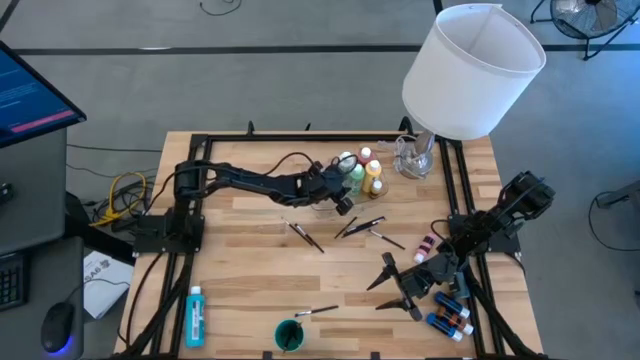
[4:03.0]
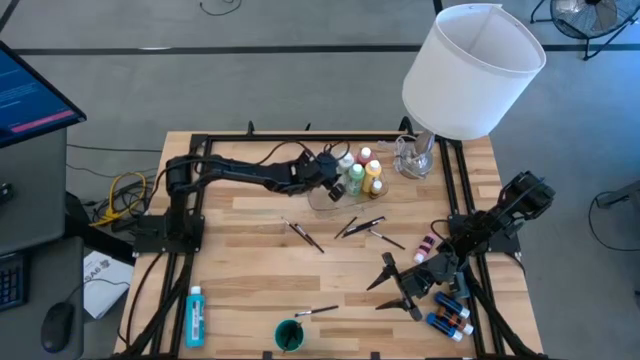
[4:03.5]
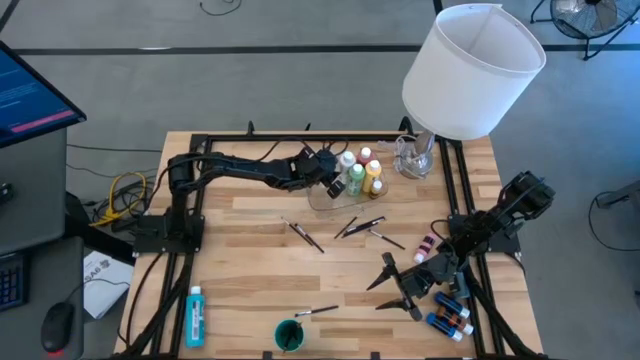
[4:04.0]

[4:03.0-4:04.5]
Task: Pick & Place Paint Supplies
Adjust the white paint bottle in the transparent bin

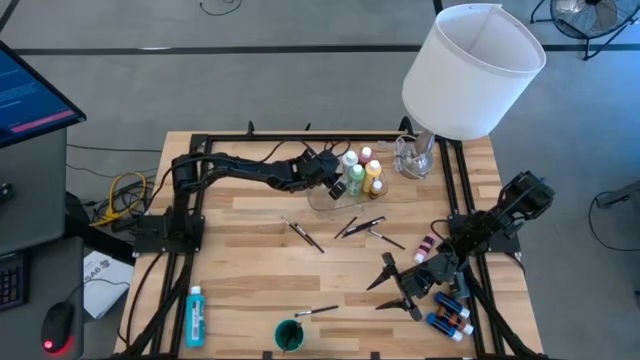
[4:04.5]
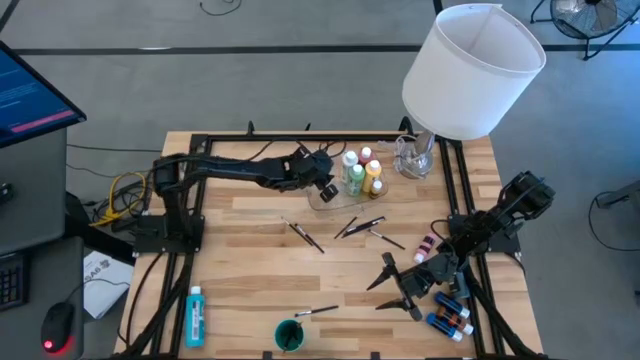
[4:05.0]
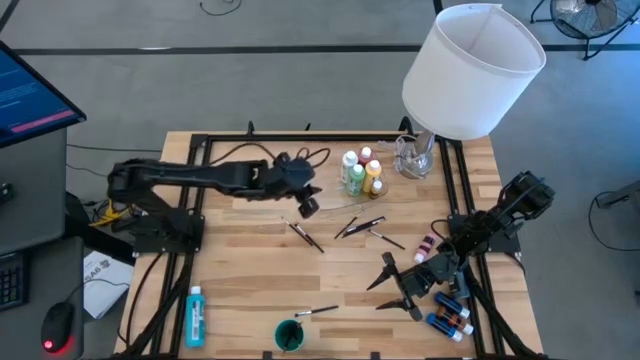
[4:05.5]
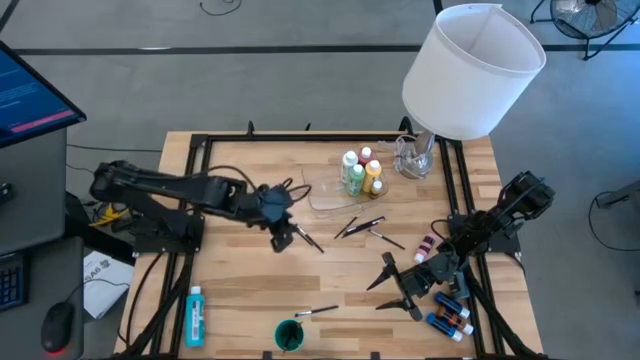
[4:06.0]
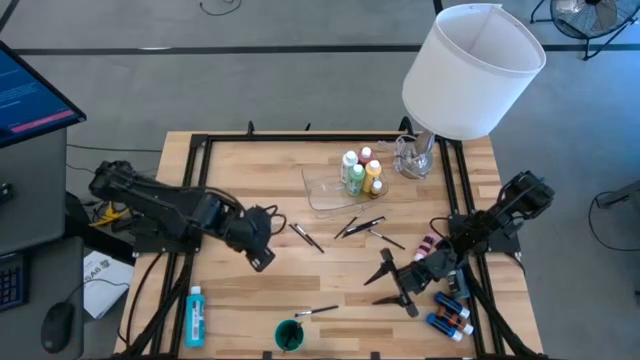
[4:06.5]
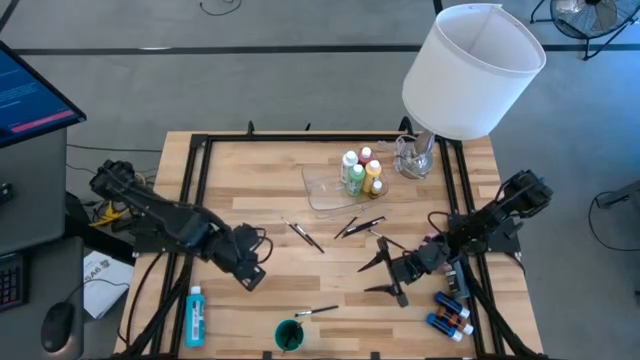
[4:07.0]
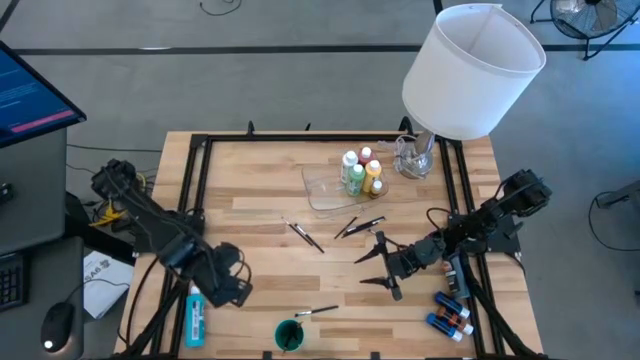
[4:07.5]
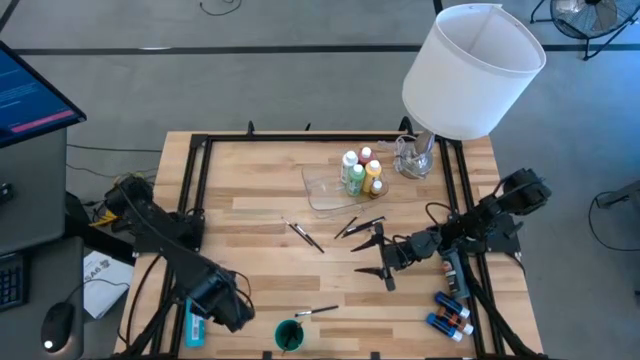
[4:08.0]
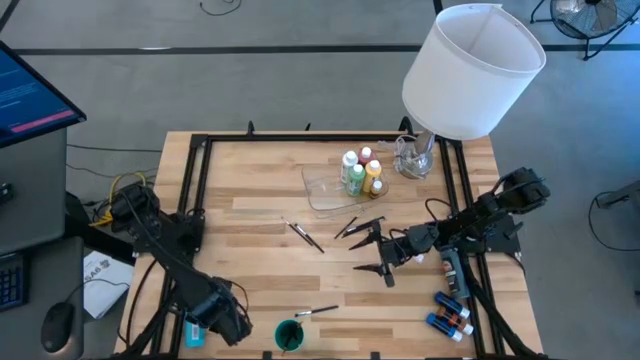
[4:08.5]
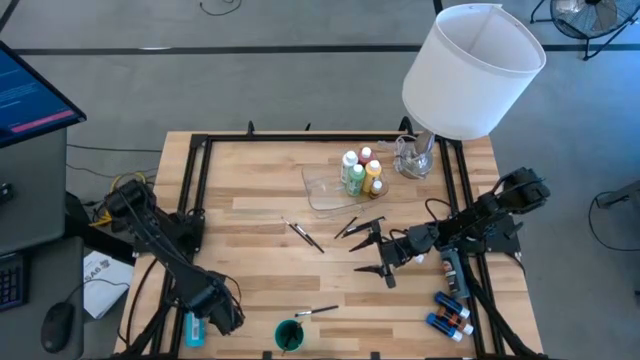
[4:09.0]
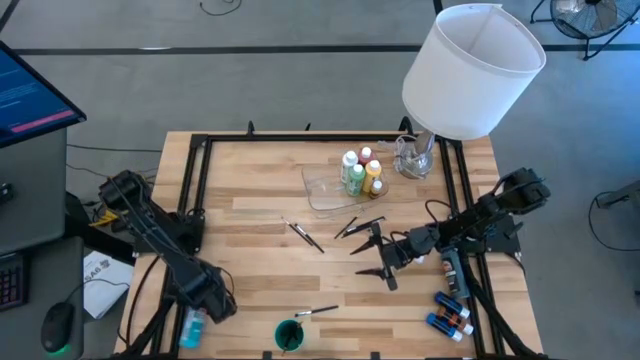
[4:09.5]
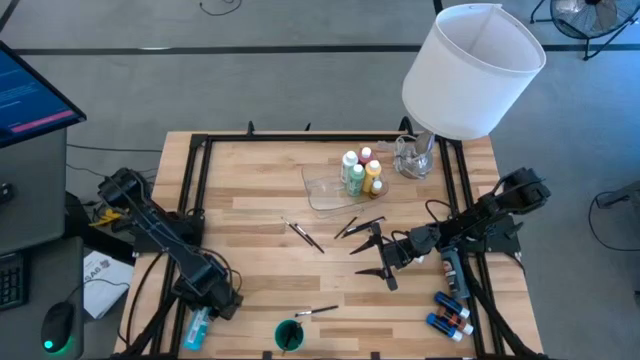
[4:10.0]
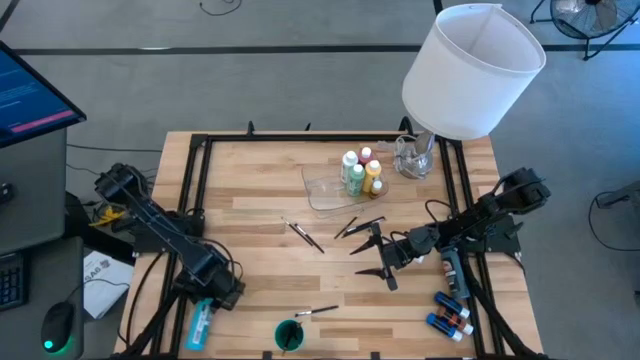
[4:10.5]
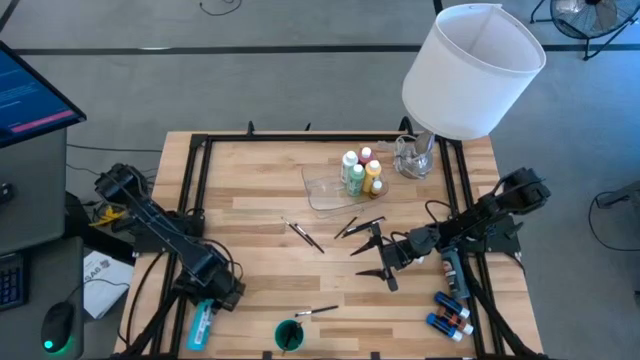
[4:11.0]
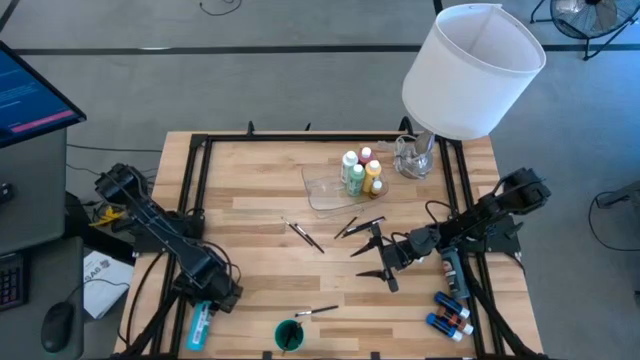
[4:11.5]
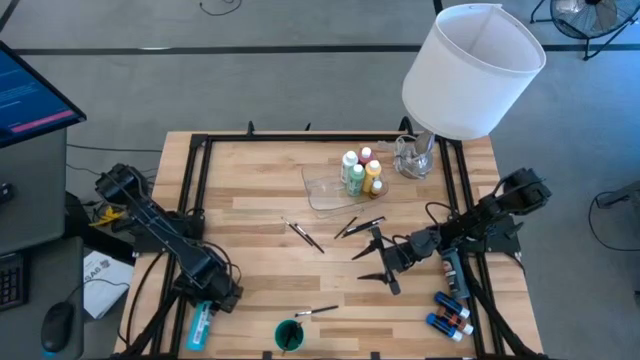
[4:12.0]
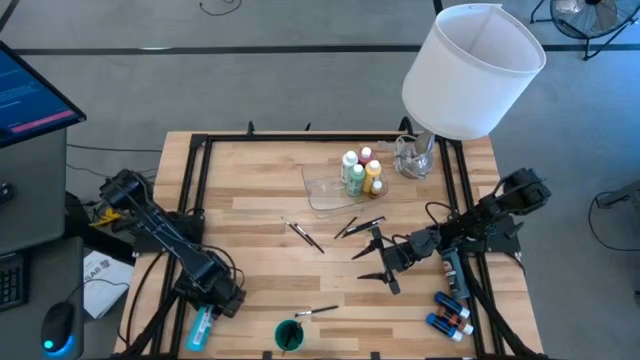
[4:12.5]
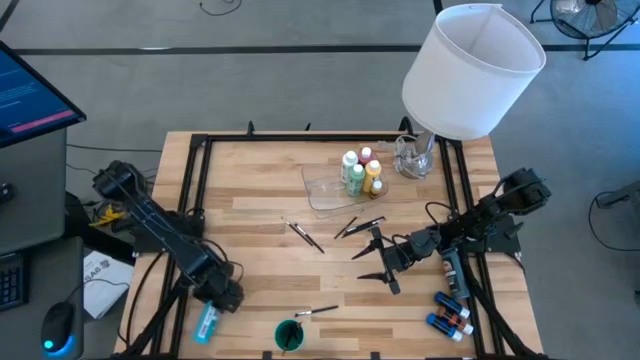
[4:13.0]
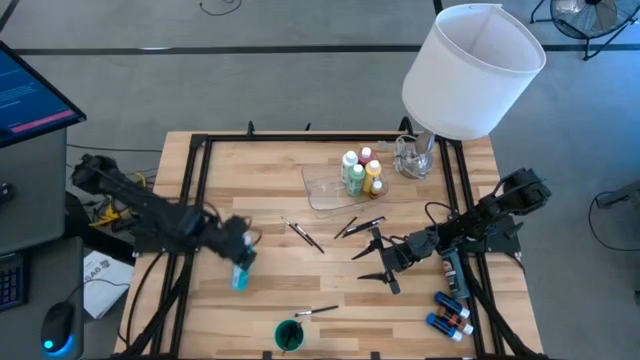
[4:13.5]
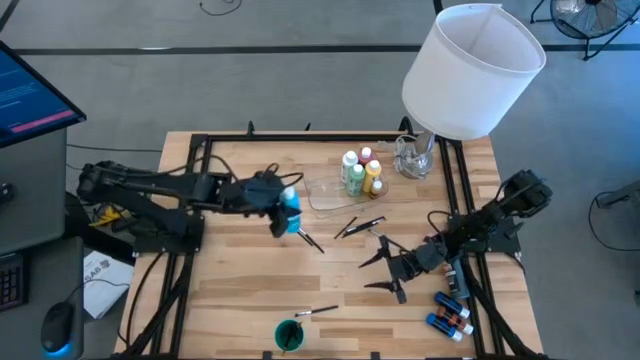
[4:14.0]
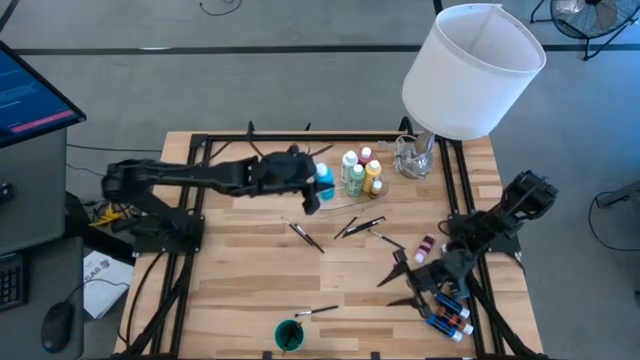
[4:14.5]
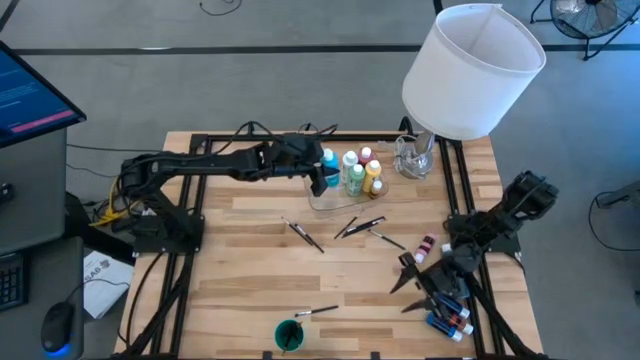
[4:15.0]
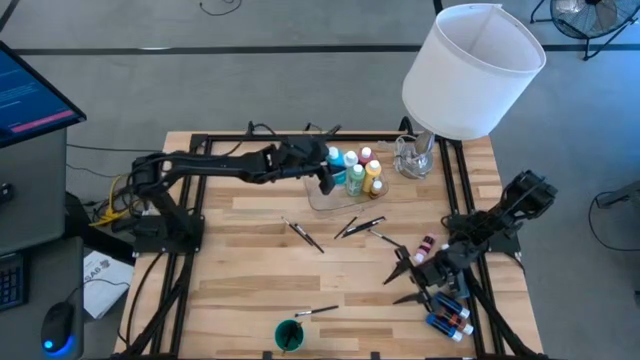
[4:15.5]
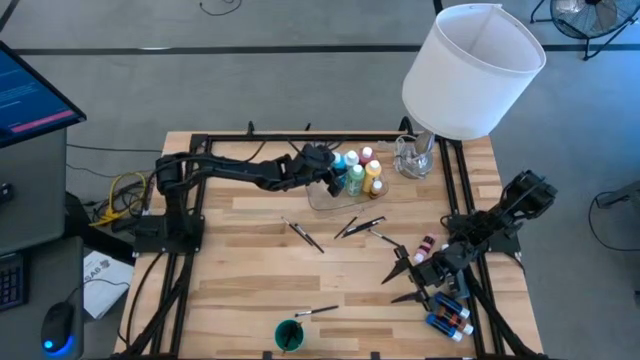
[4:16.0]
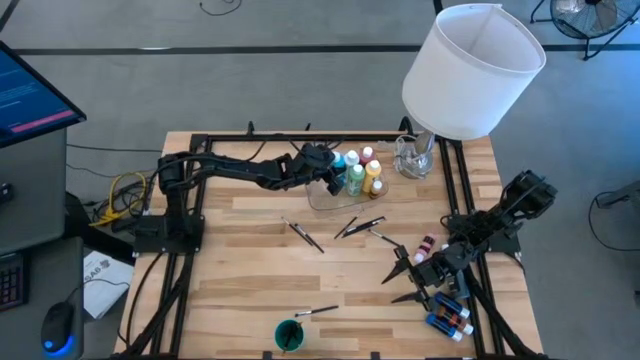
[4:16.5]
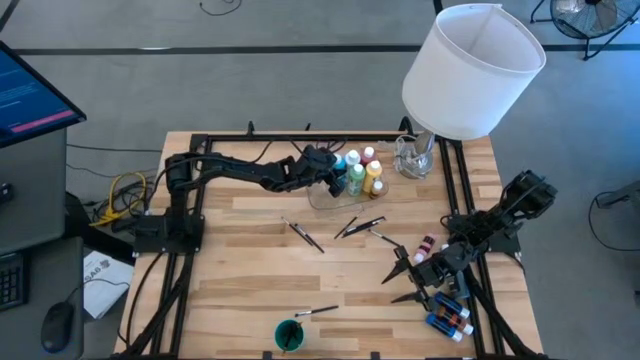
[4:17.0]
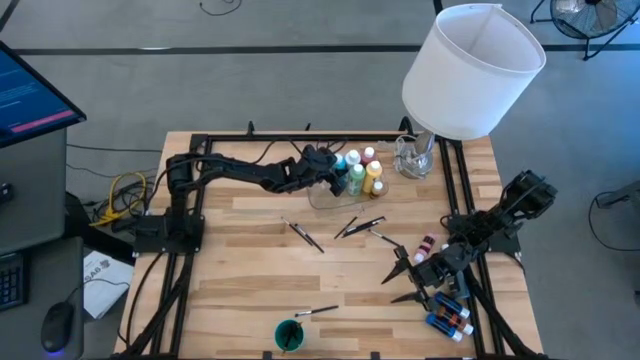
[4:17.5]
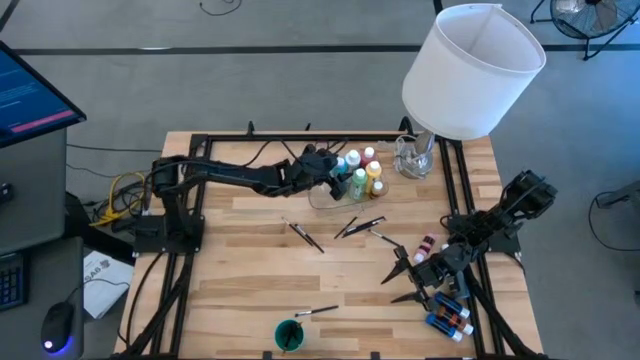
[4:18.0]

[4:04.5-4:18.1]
Put the big light blue paint bottle into the transparent bin
